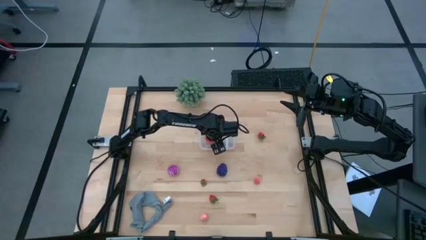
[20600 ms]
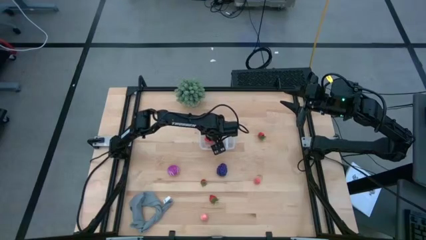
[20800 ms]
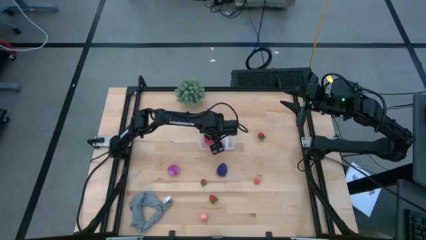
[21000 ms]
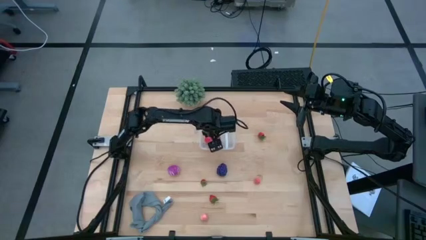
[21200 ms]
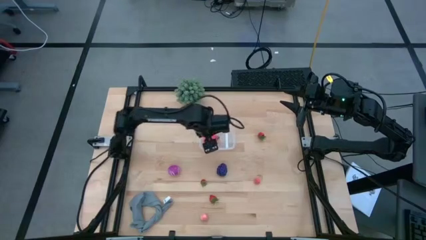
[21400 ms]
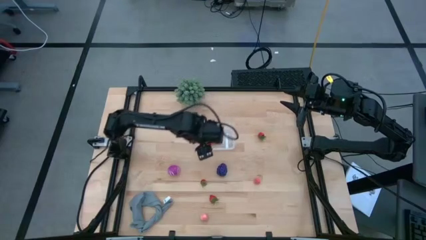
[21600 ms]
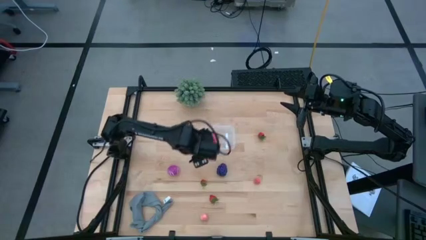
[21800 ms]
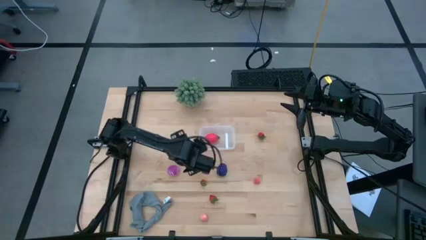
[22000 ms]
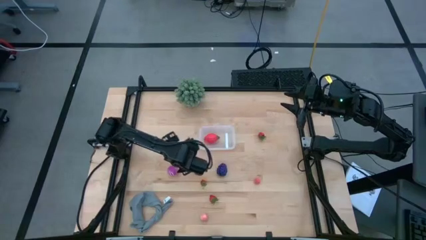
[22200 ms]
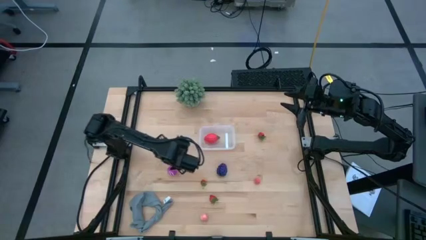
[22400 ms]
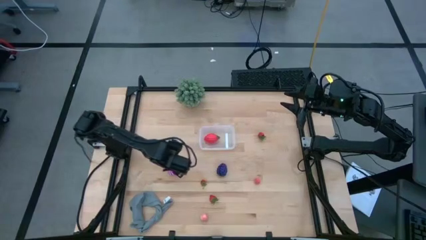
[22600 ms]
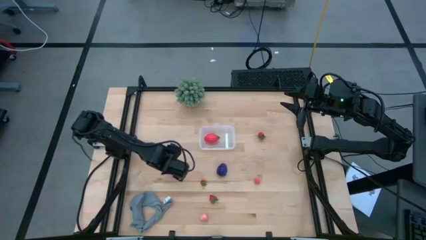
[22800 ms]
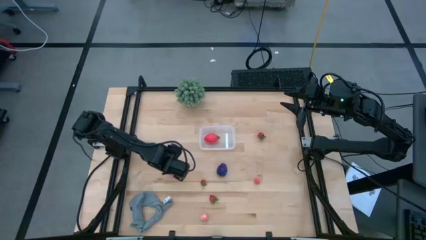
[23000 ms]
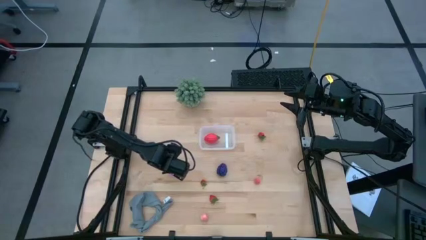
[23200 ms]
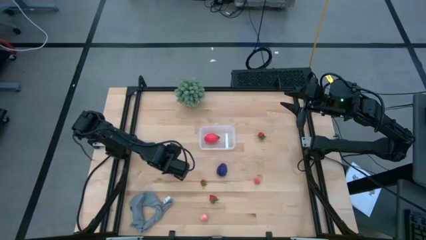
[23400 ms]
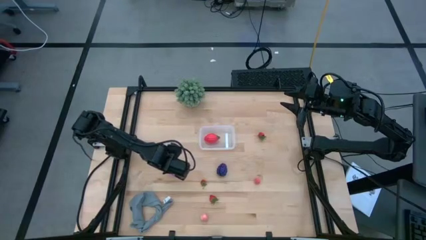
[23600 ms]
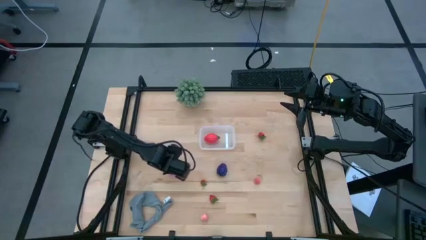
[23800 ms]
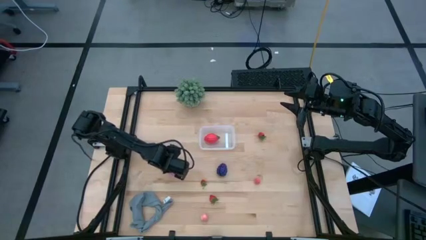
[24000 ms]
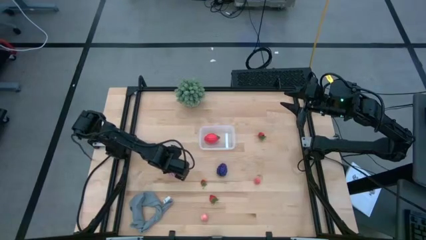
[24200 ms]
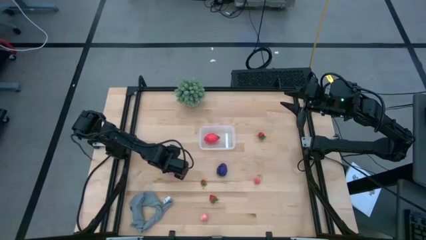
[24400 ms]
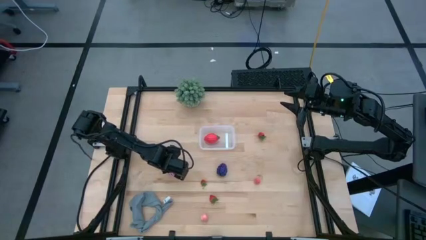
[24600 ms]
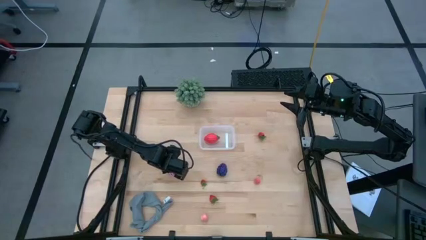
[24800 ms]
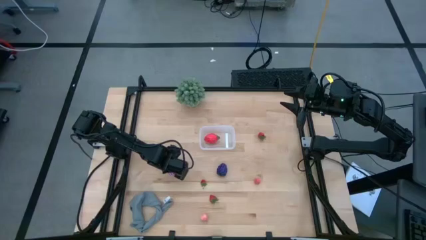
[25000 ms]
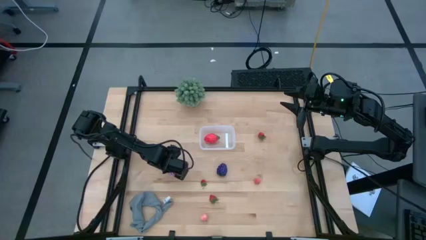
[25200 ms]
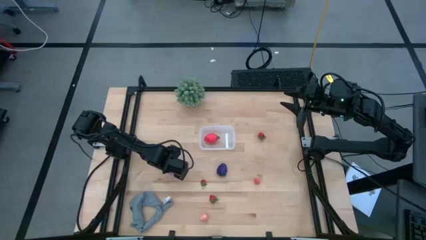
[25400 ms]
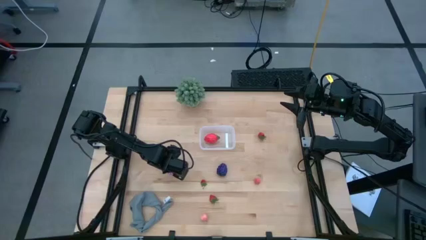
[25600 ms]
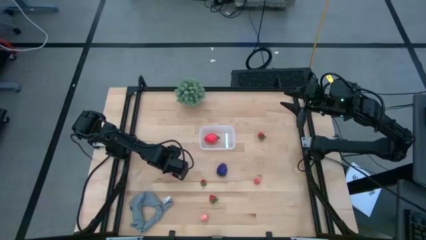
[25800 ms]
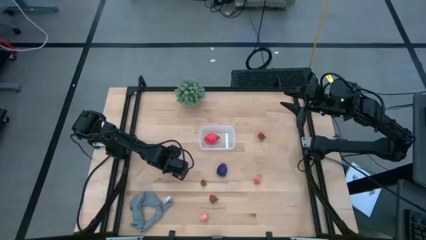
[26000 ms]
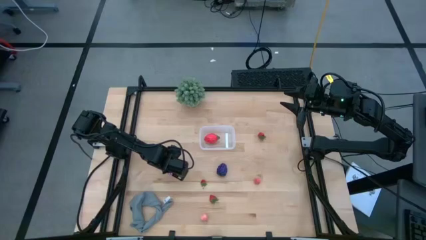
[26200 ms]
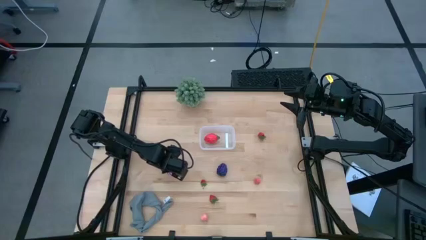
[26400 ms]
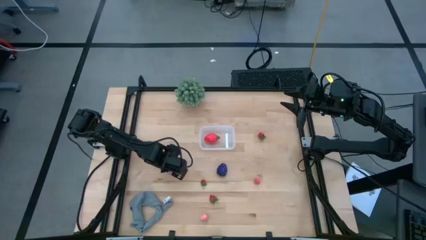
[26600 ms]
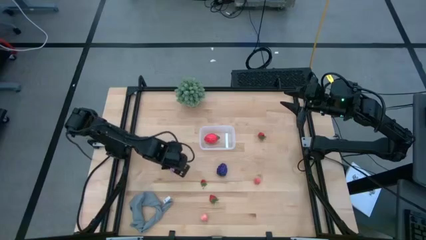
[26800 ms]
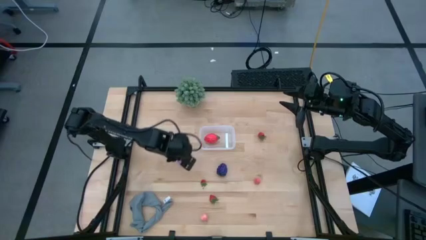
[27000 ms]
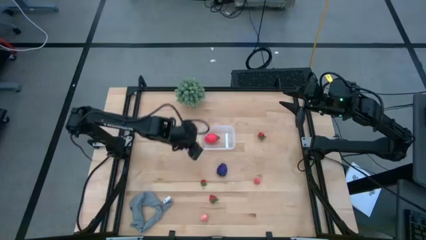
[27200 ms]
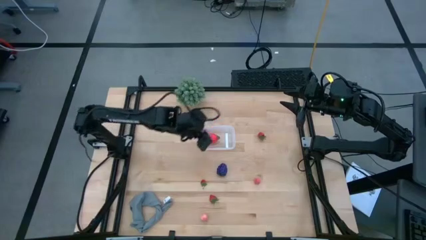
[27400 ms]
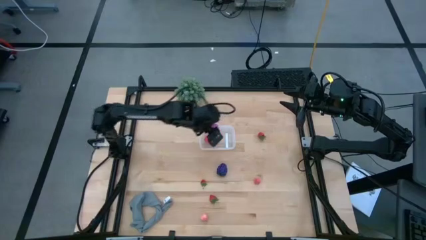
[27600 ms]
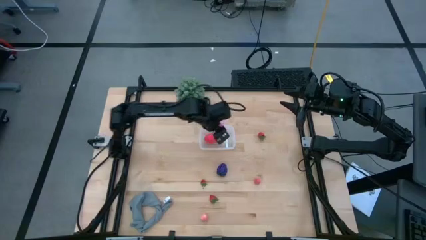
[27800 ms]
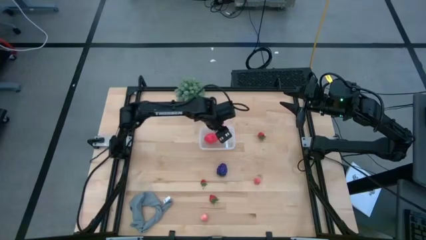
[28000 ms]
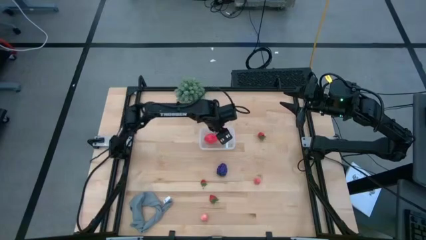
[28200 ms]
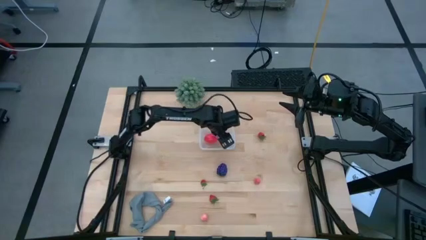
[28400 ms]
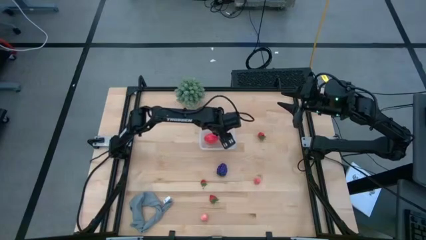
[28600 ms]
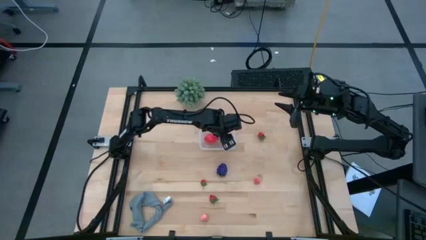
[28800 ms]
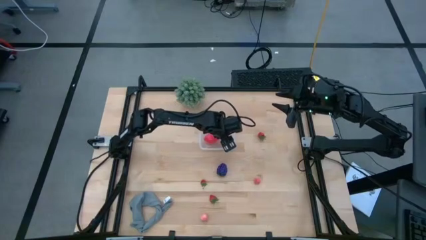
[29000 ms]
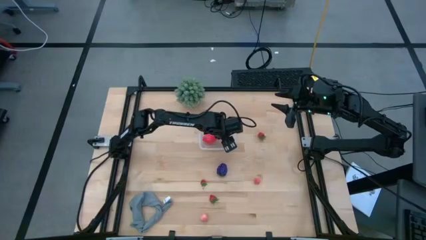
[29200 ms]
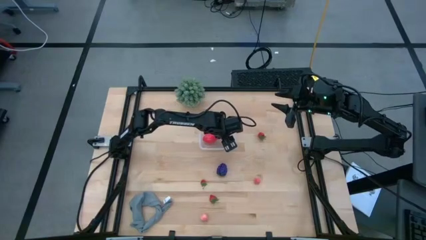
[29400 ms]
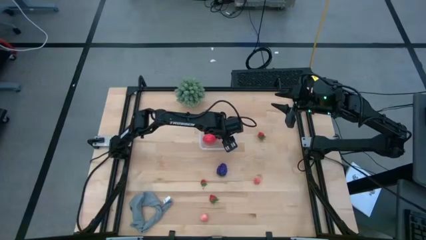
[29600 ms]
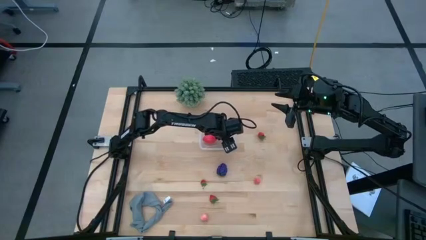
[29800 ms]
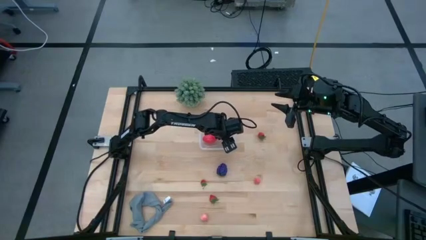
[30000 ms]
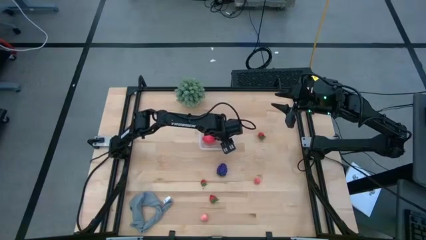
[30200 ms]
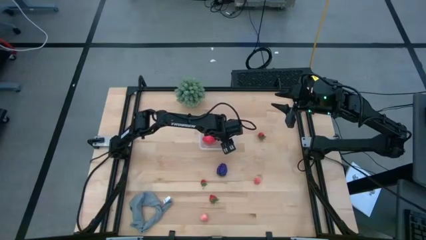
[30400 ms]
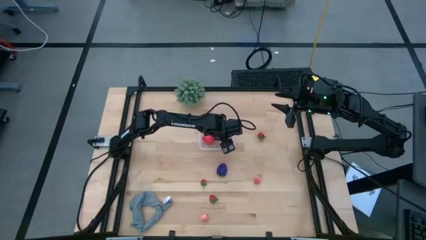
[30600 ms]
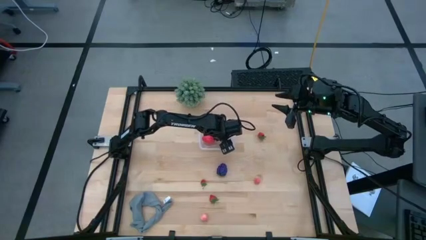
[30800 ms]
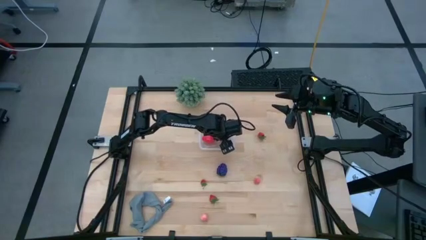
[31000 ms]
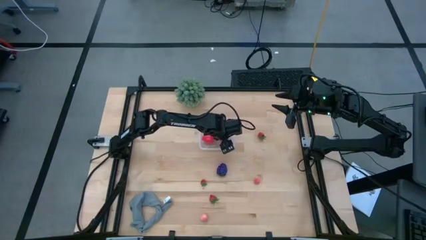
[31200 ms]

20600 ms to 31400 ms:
Task: Pick and placing Produce into tupperware
Put the onion into the bin

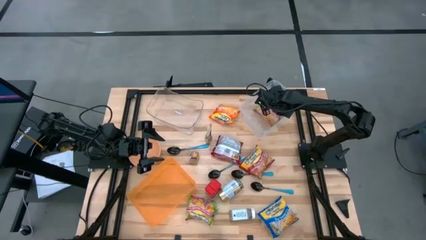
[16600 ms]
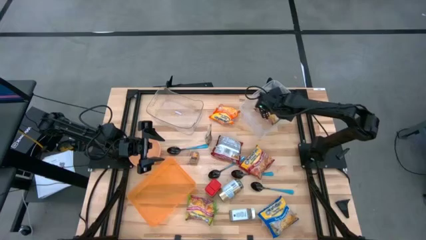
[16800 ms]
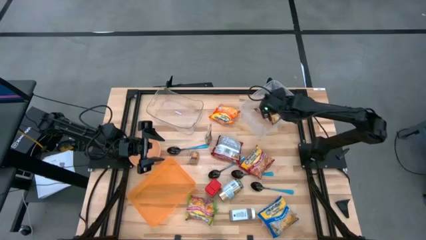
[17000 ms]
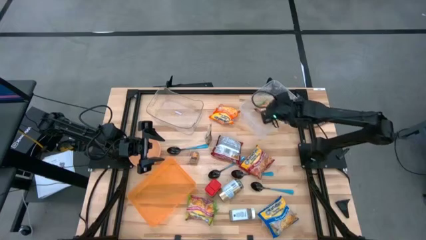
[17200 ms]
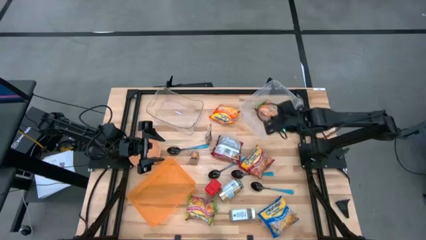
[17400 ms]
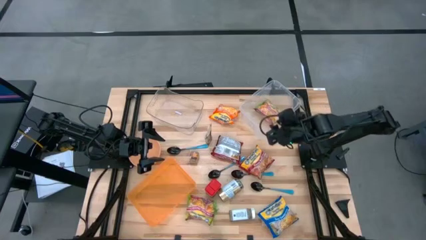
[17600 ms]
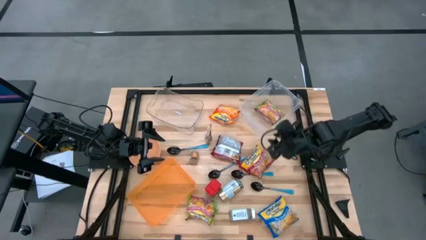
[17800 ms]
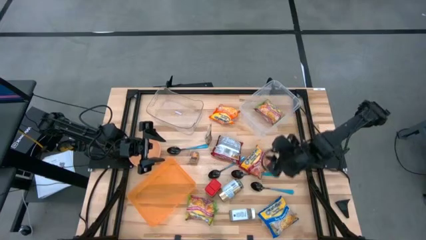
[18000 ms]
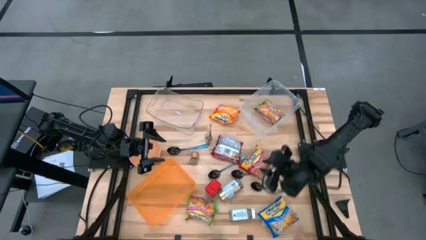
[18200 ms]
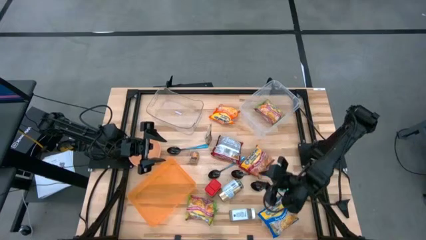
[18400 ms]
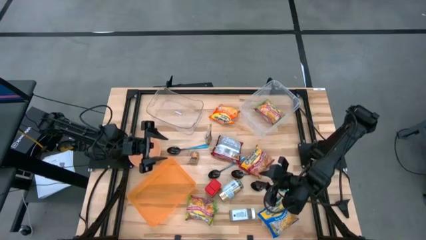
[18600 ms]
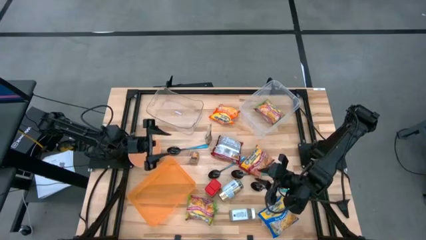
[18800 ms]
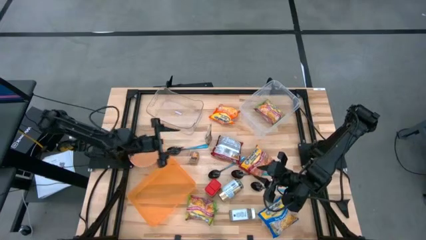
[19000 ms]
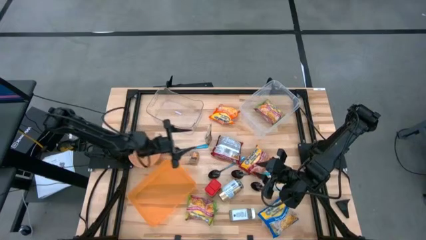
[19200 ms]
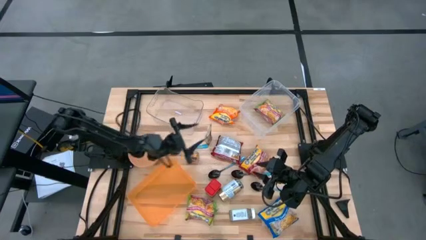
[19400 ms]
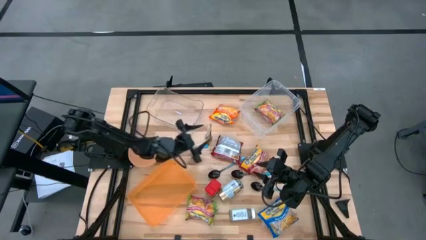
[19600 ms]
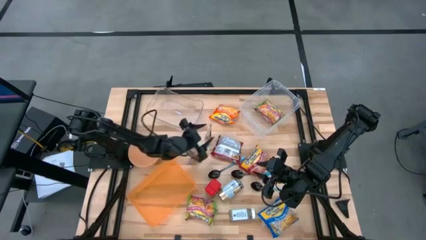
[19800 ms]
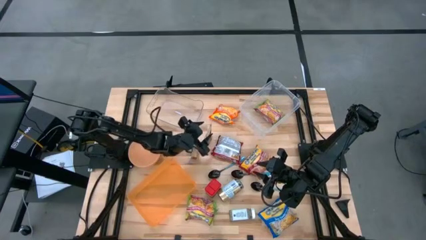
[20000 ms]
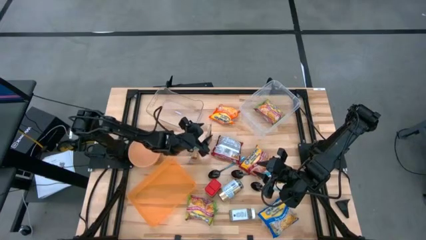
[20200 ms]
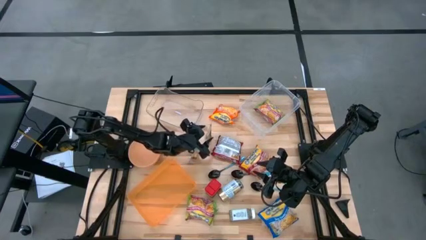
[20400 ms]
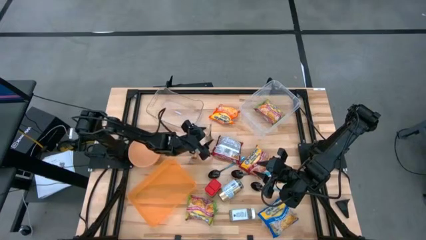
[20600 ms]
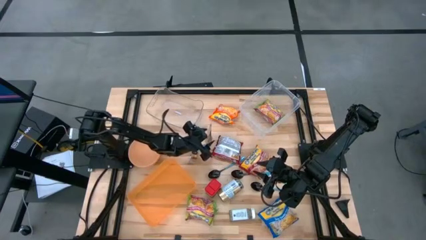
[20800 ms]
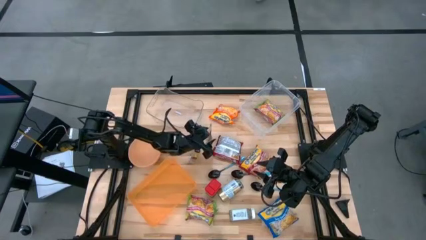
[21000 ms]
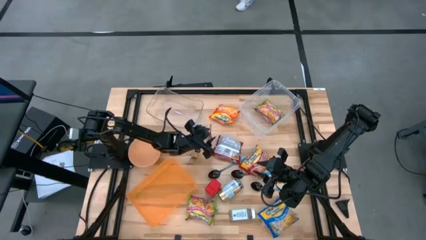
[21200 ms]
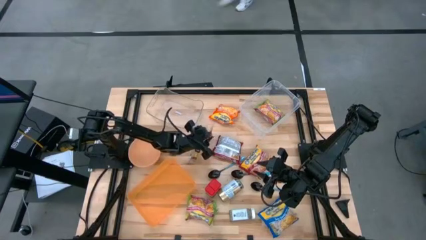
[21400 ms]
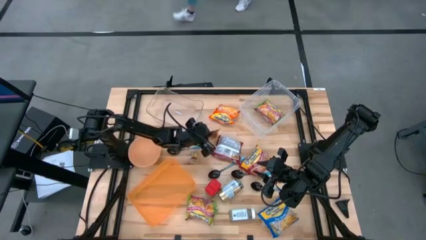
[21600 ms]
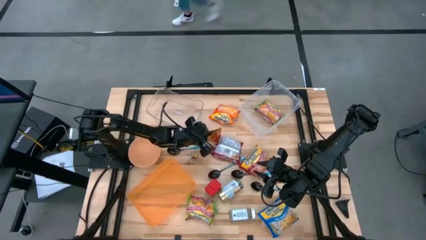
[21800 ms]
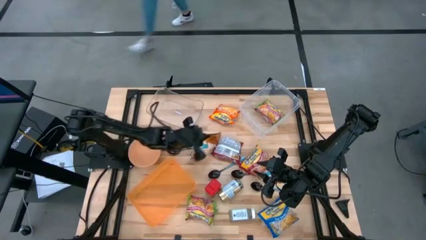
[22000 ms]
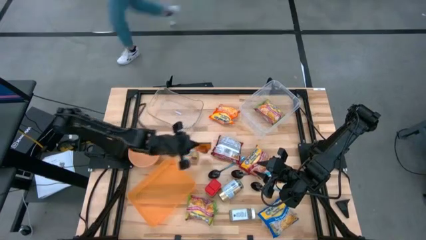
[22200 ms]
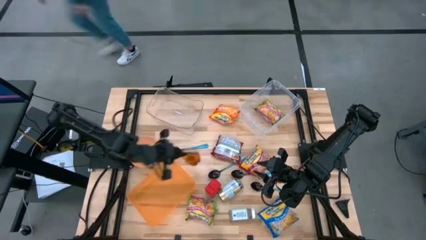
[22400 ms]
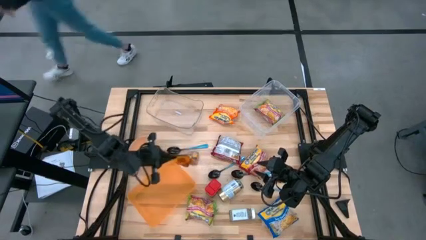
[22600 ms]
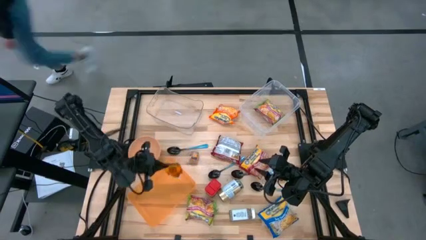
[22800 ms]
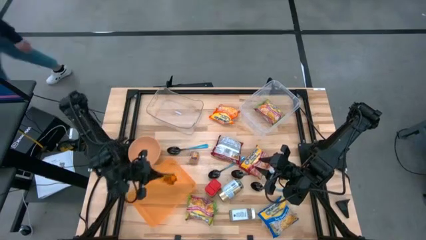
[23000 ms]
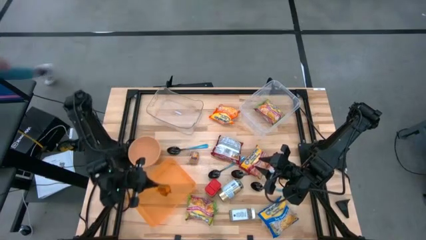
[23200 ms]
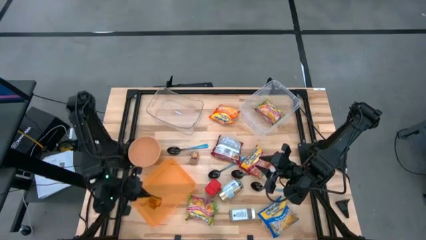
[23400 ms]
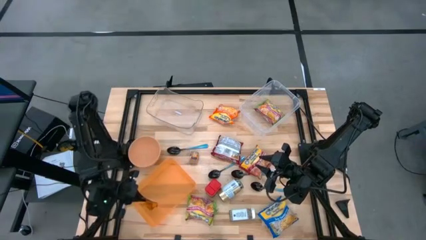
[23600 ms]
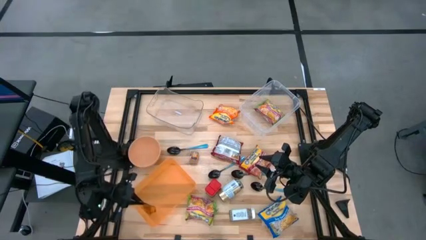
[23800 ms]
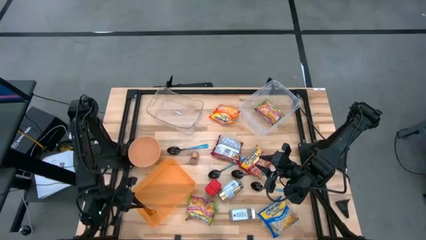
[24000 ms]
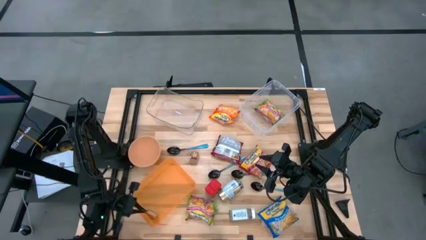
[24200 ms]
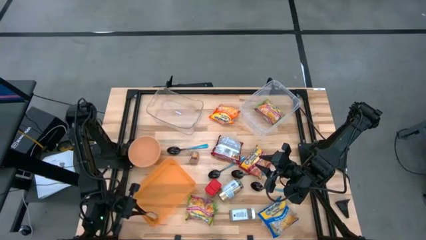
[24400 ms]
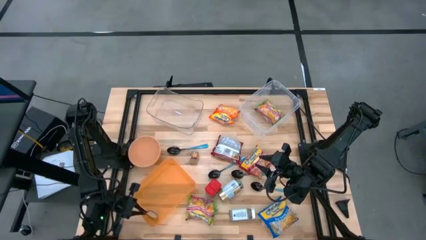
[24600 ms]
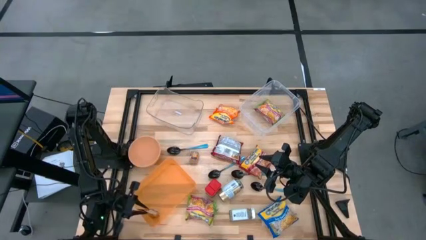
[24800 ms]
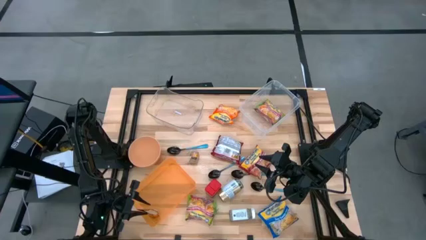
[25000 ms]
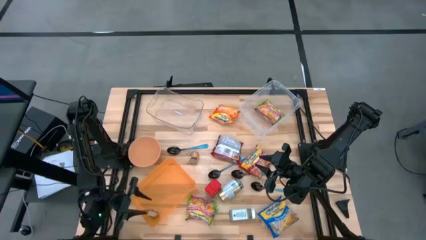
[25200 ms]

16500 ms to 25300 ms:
Task: Pick & Place Food Item
Put the orange seasoning pack into the orange bin
